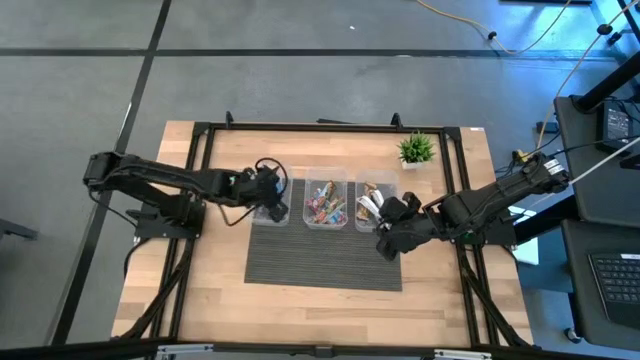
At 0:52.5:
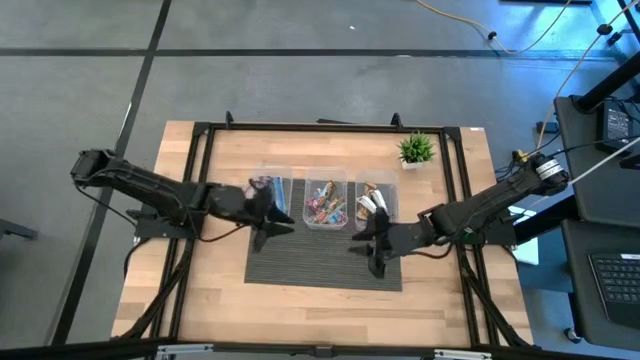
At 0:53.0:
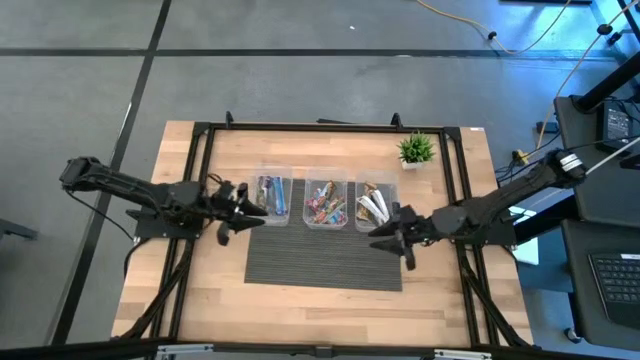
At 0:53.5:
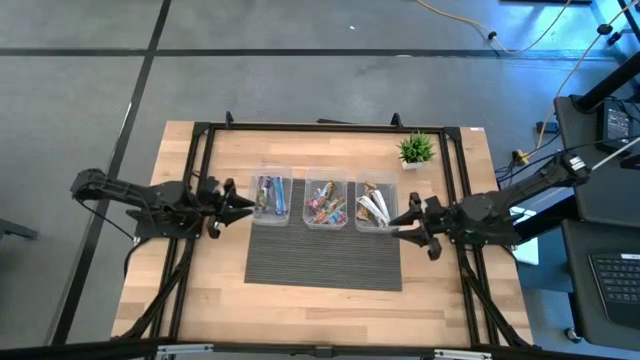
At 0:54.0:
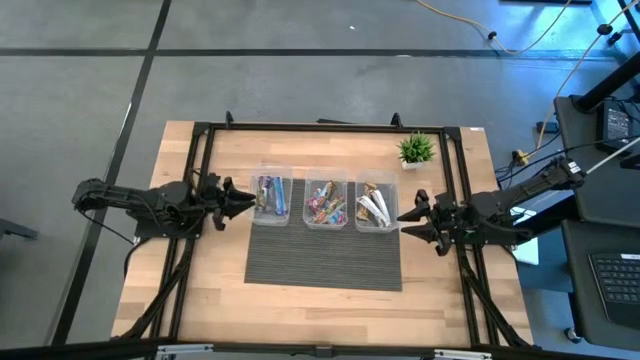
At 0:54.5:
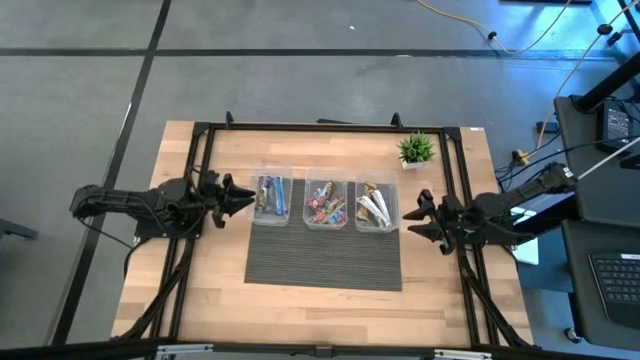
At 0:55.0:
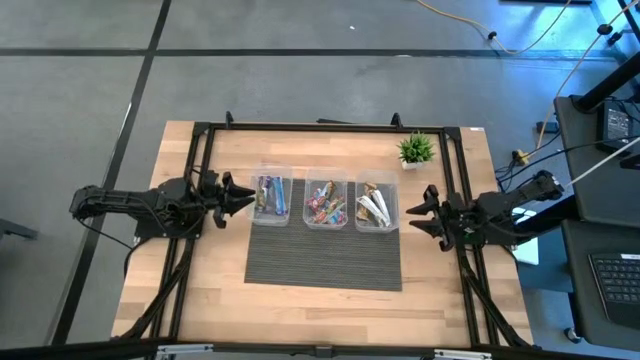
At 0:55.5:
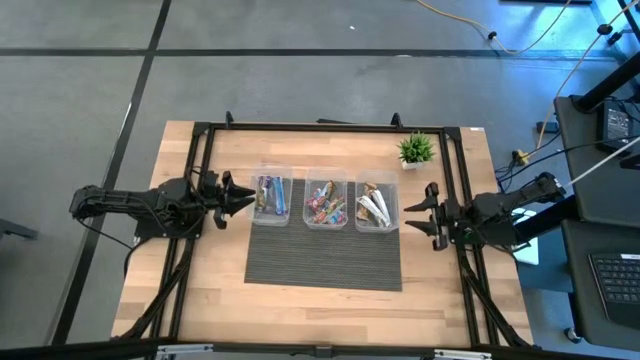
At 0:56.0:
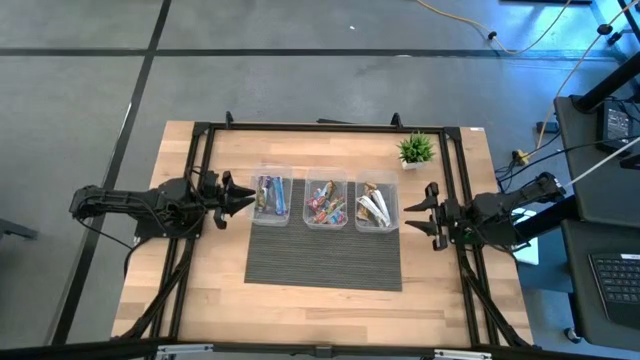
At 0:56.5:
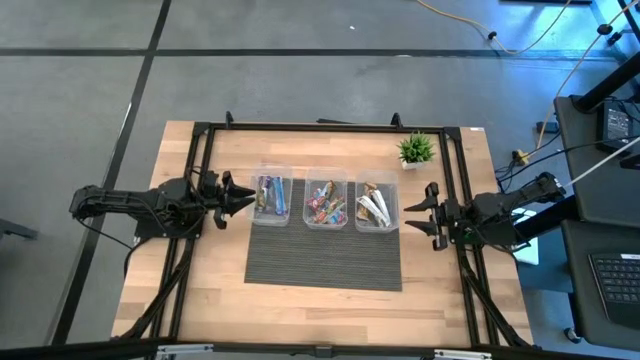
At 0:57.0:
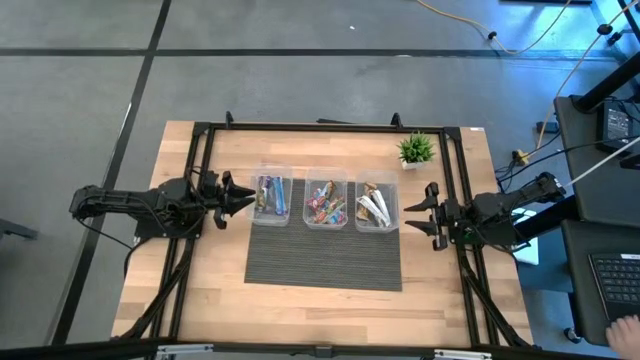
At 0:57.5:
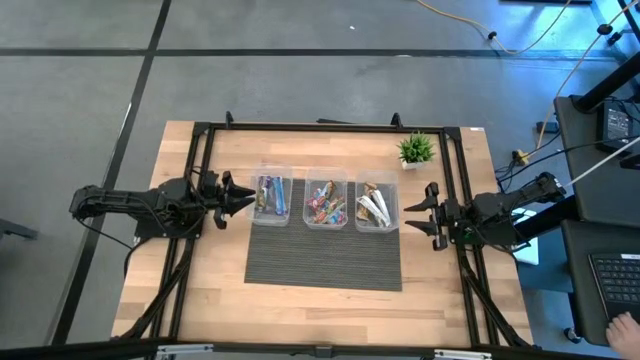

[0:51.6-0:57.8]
Task: Pick and place Granola Bars by type
Return to Home Position

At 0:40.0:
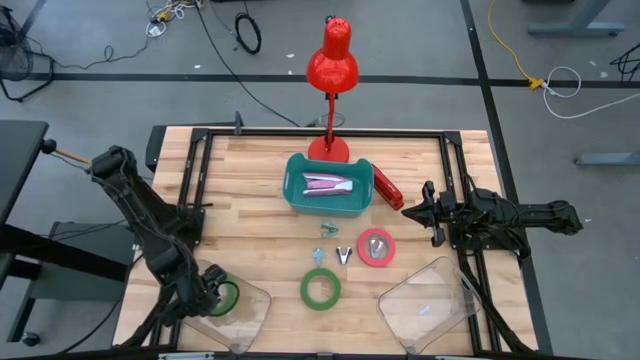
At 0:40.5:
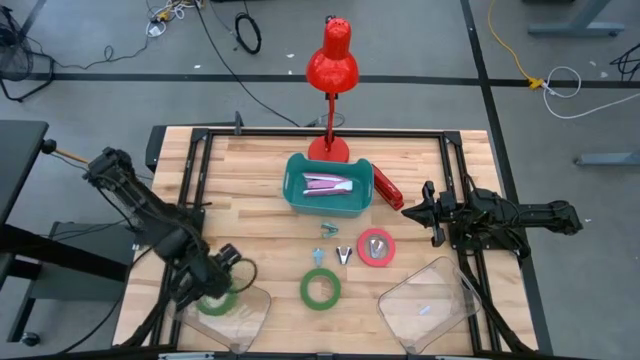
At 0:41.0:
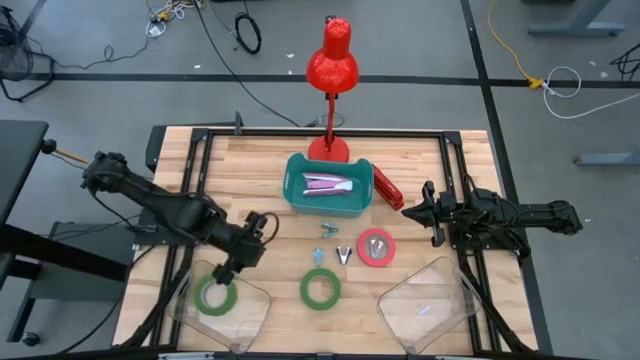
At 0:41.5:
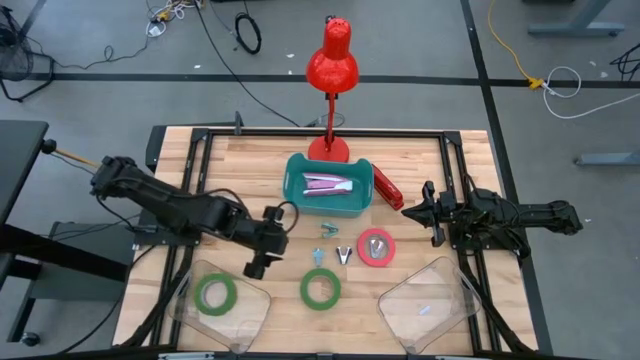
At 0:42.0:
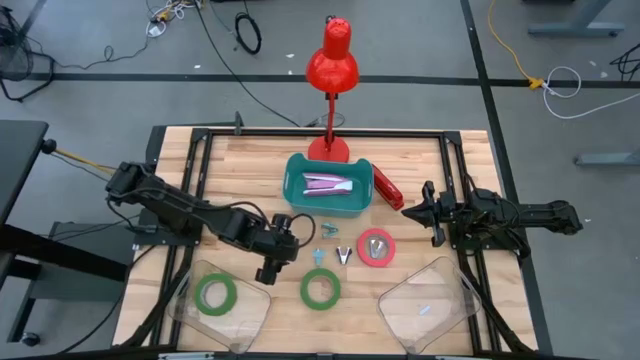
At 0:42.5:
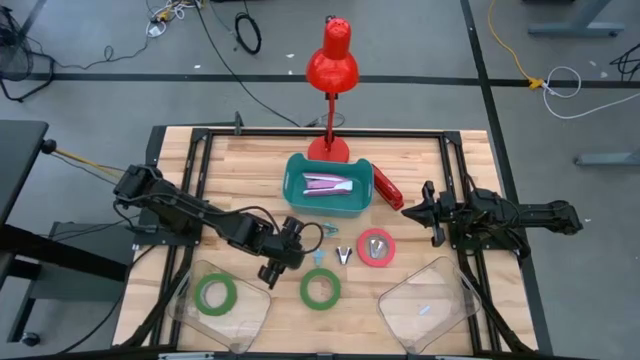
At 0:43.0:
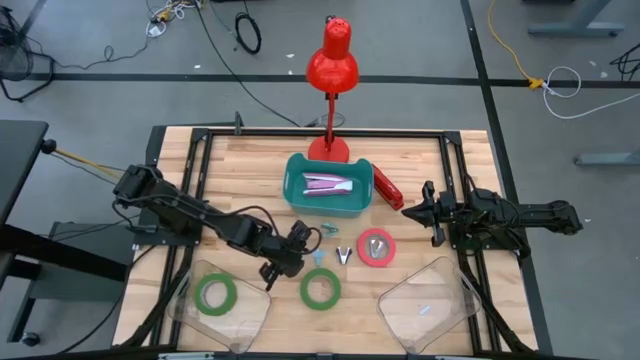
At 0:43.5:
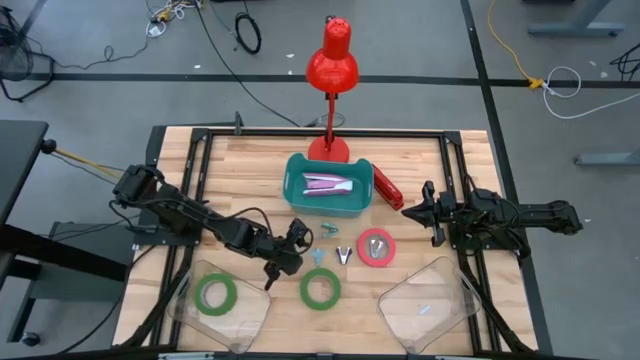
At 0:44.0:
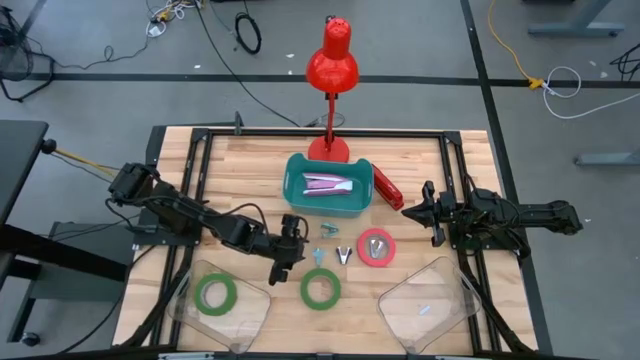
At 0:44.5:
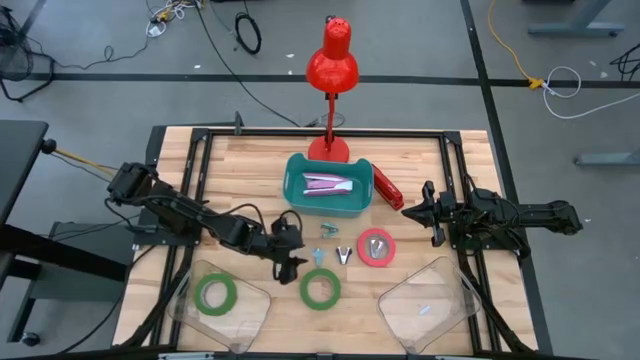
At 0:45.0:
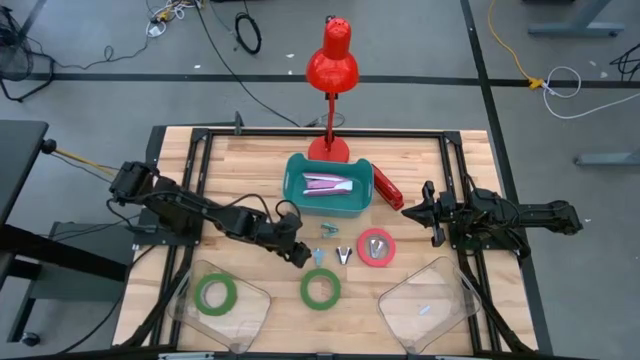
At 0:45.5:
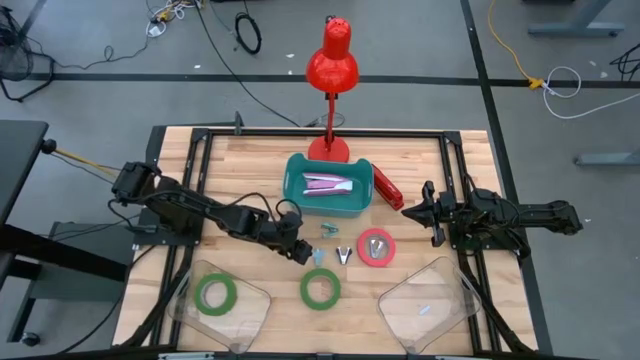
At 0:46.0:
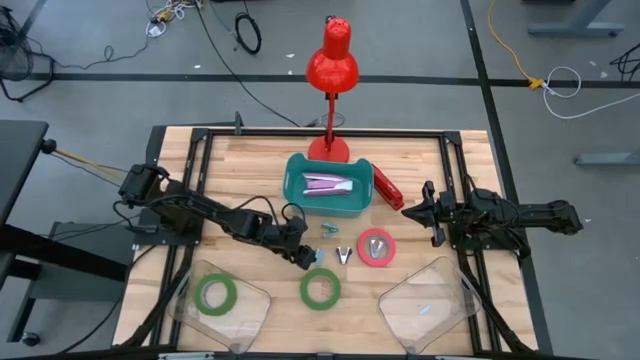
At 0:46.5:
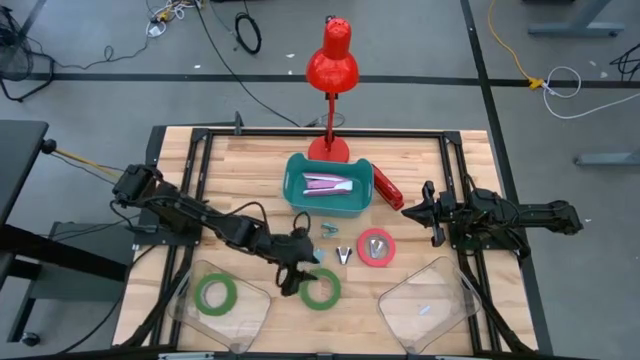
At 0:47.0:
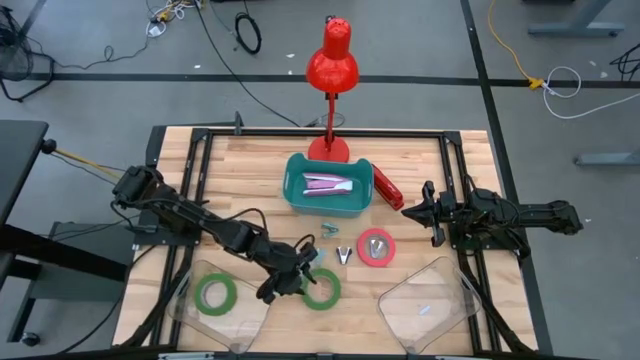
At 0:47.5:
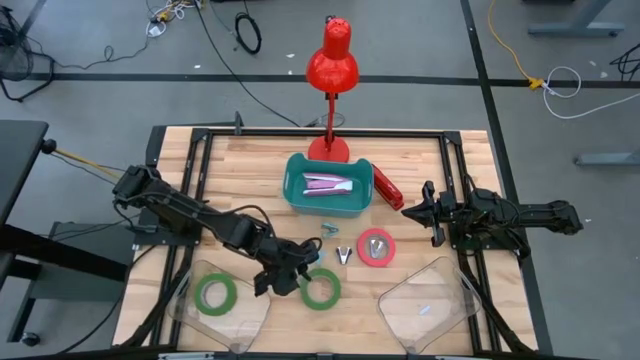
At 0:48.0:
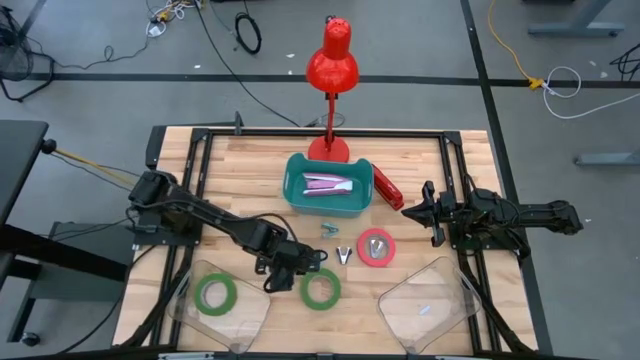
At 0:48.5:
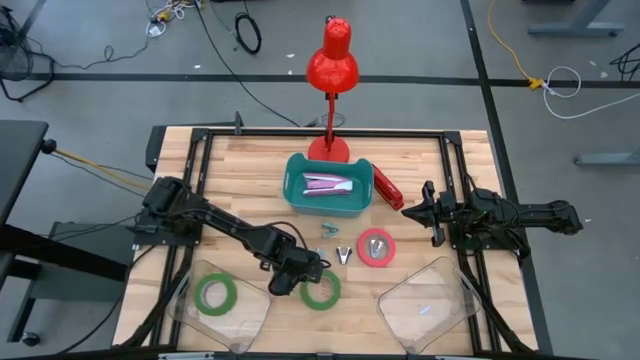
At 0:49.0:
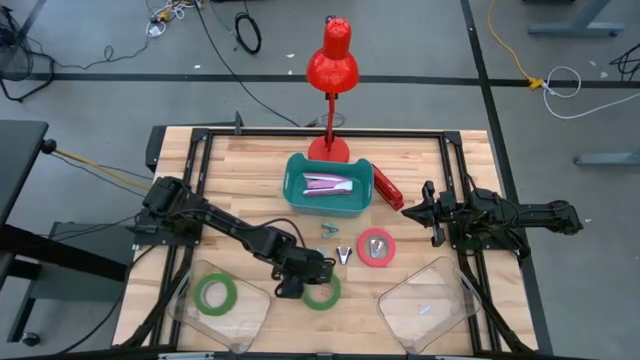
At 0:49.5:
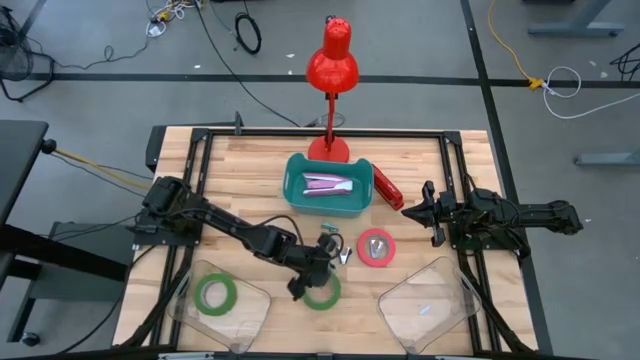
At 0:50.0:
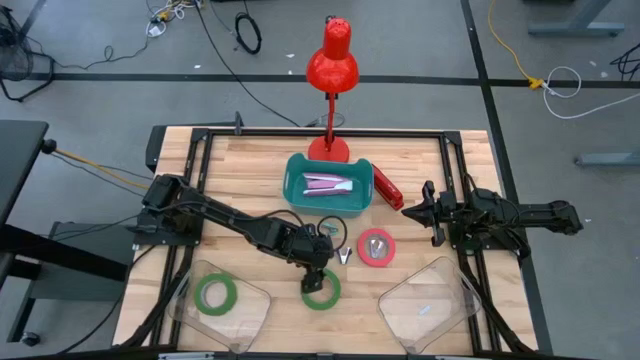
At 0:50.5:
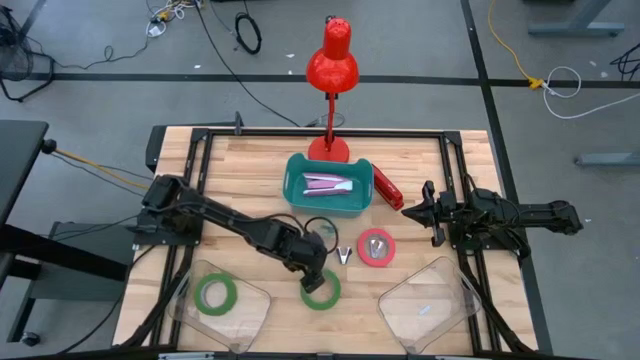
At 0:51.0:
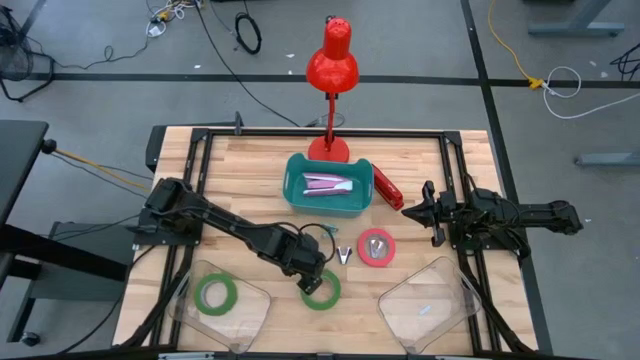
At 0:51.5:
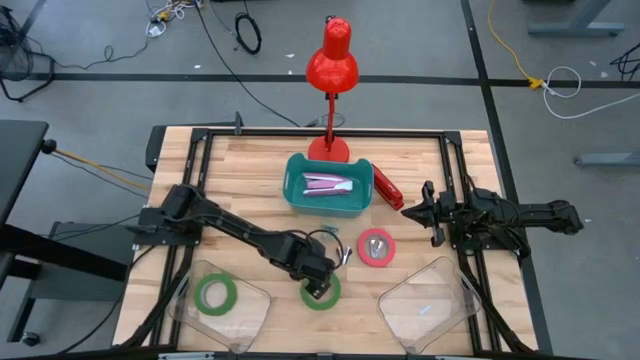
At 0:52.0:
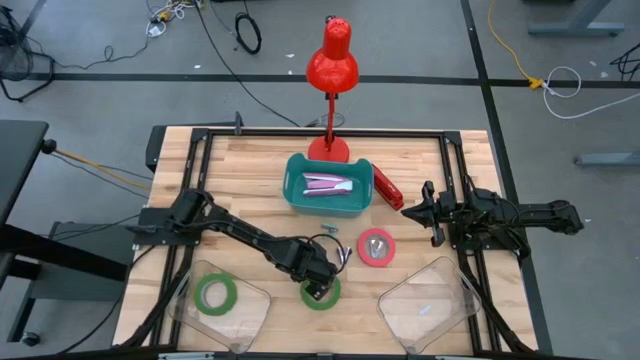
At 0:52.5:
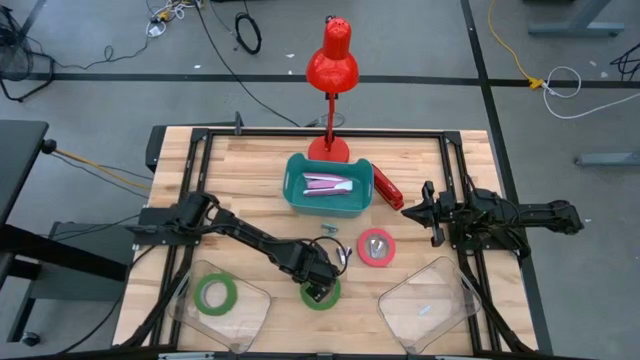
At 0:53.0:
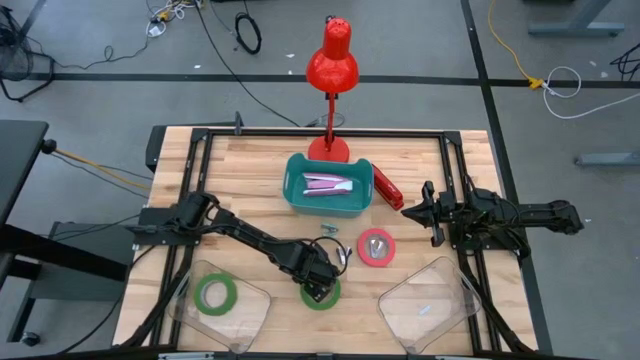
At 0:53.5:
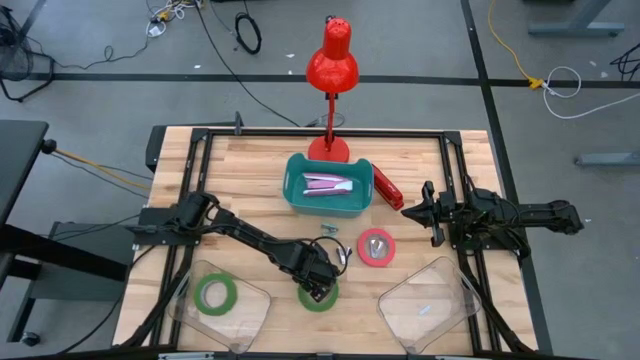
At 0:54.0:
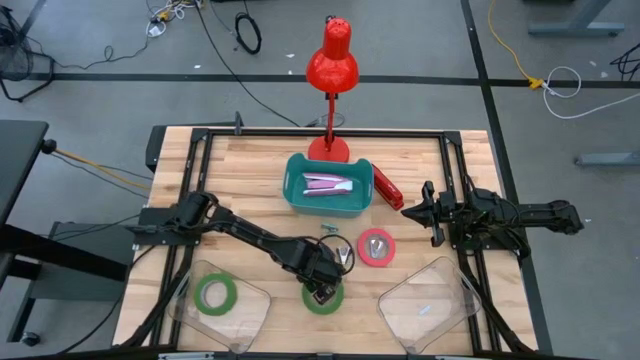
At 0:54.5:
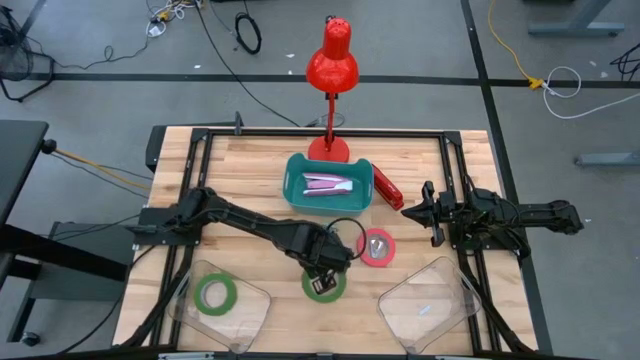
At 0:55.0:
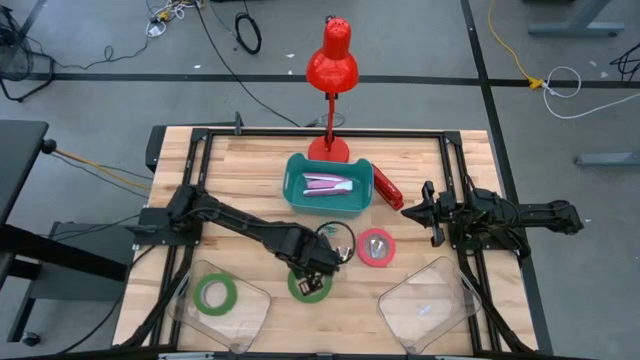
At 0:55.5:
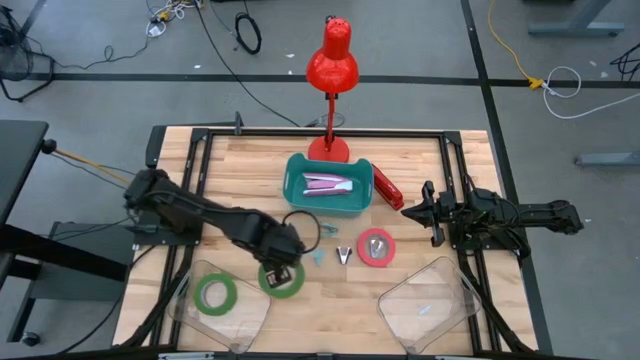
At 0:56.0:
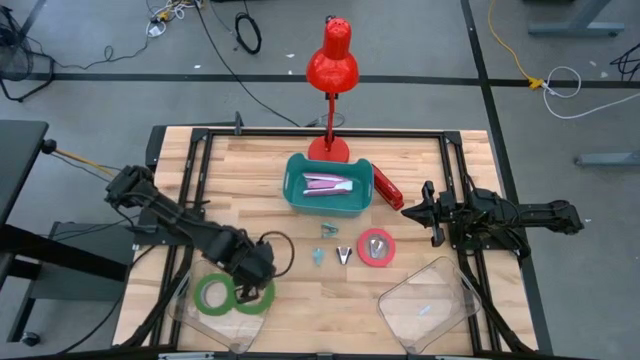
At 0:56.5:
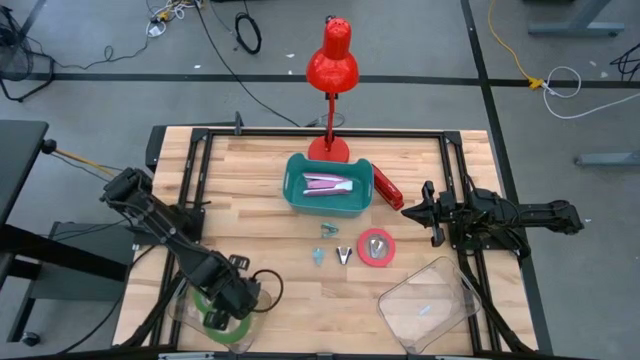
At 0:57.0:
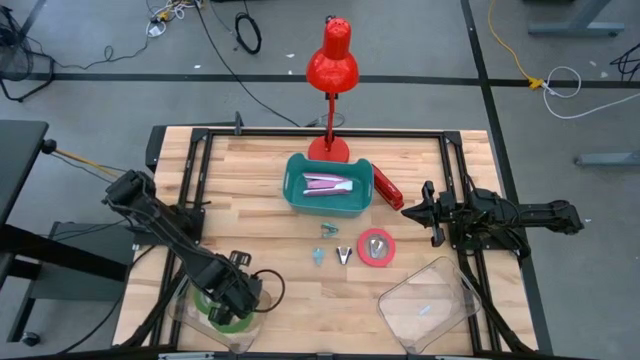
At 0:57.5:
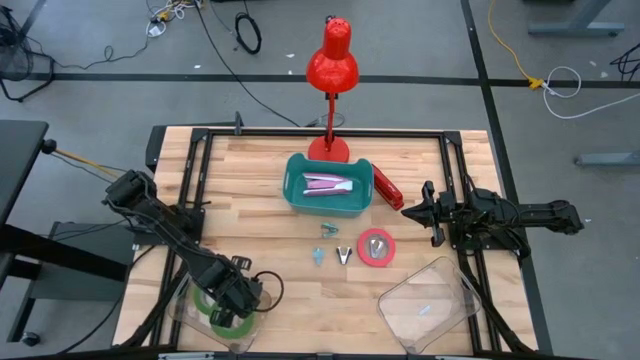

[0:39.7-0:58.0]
Task: Pick and place Stapler, Stapler remover, tape
Put the green tape in the left transparent bin
